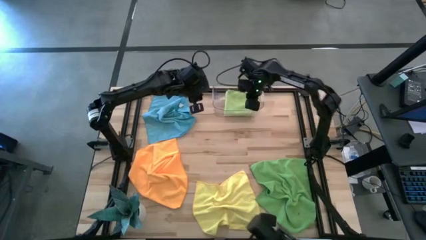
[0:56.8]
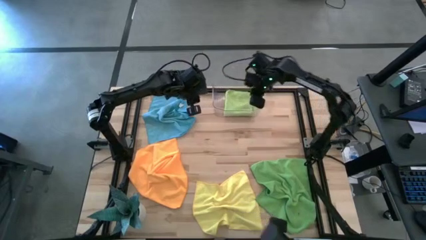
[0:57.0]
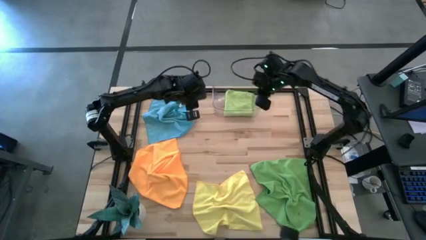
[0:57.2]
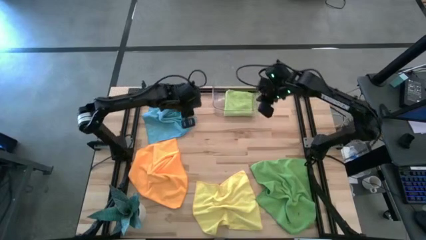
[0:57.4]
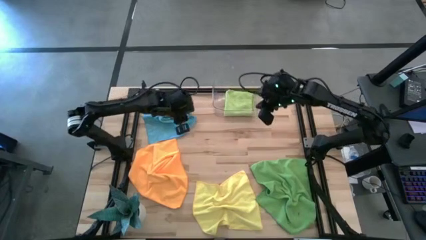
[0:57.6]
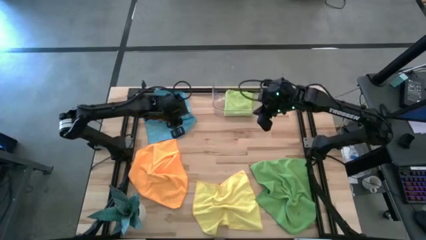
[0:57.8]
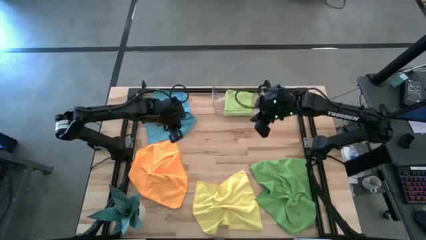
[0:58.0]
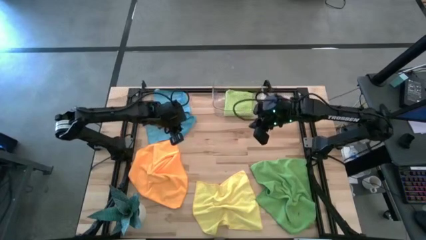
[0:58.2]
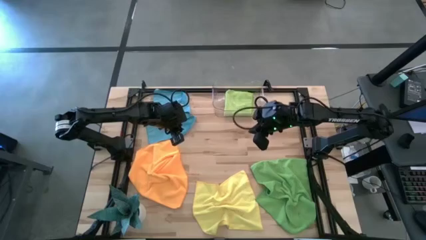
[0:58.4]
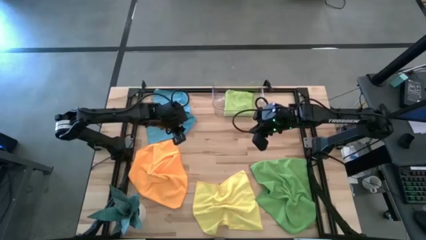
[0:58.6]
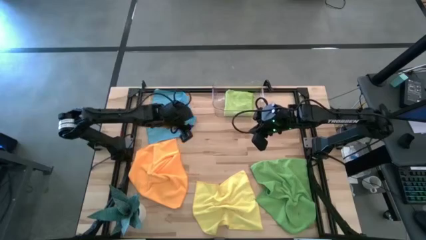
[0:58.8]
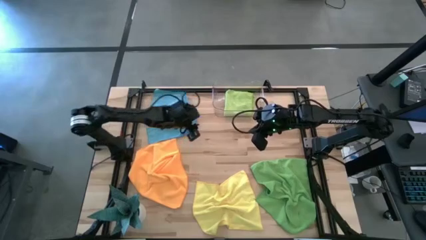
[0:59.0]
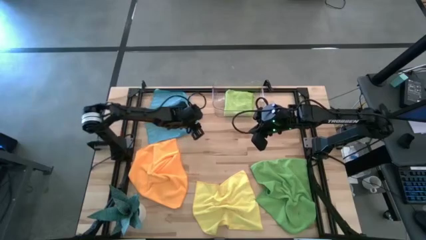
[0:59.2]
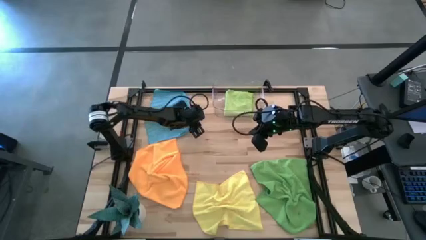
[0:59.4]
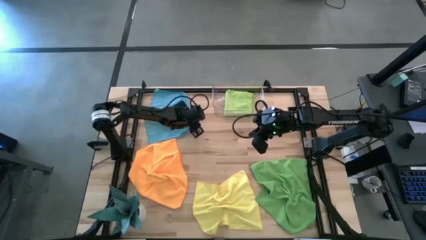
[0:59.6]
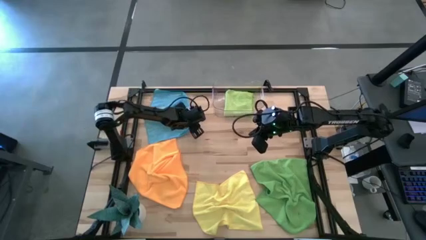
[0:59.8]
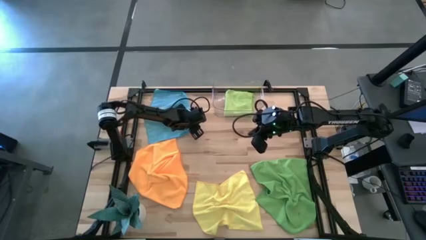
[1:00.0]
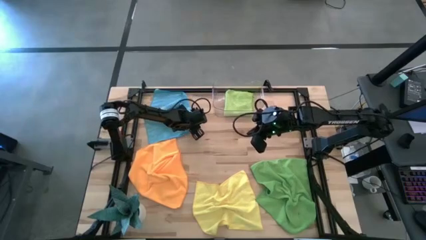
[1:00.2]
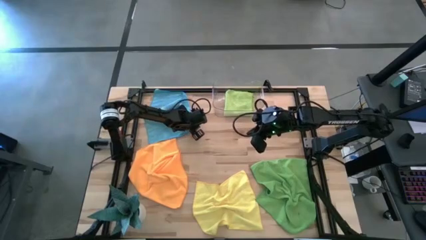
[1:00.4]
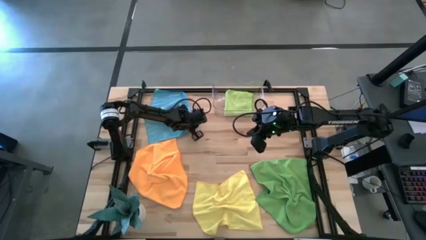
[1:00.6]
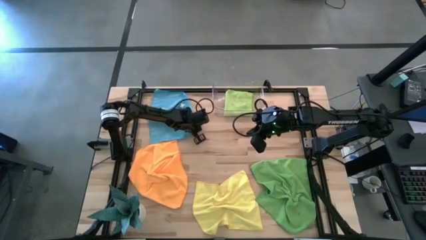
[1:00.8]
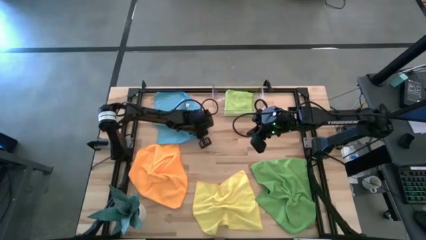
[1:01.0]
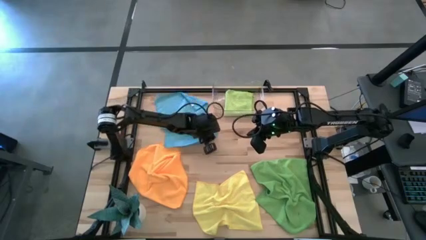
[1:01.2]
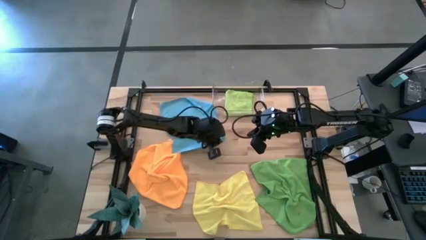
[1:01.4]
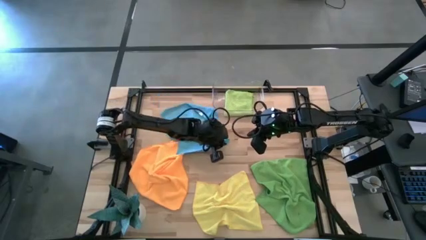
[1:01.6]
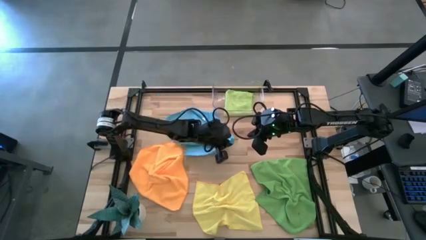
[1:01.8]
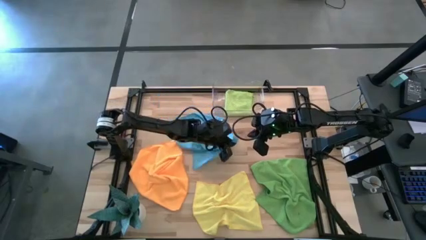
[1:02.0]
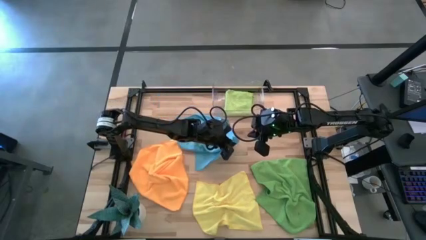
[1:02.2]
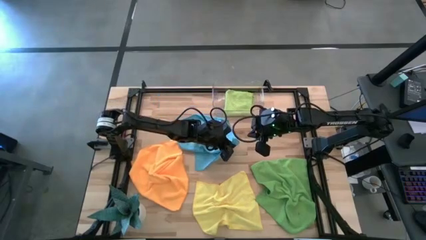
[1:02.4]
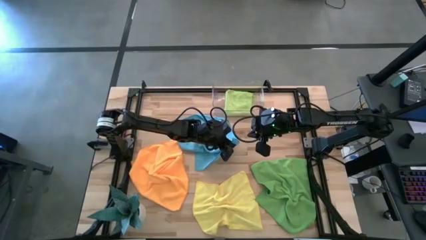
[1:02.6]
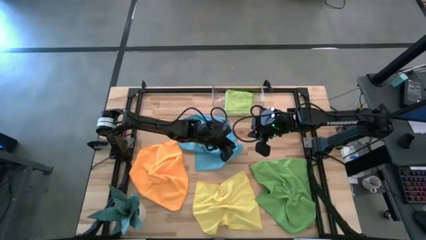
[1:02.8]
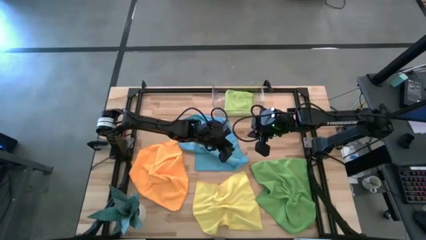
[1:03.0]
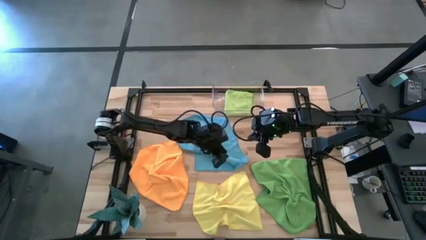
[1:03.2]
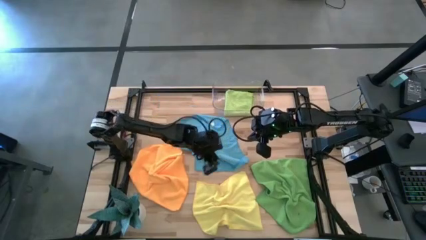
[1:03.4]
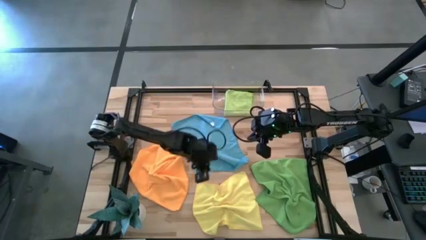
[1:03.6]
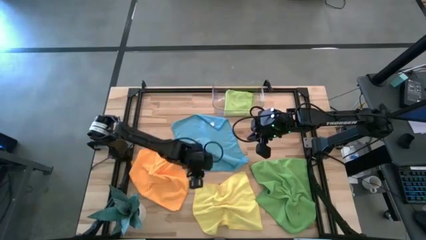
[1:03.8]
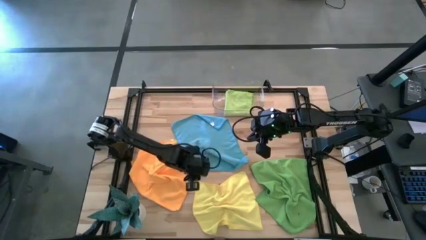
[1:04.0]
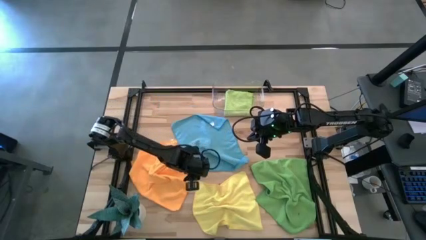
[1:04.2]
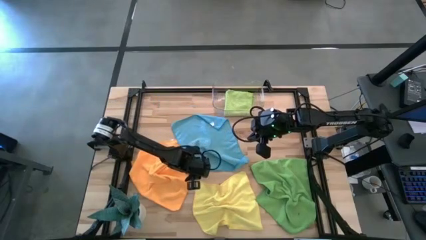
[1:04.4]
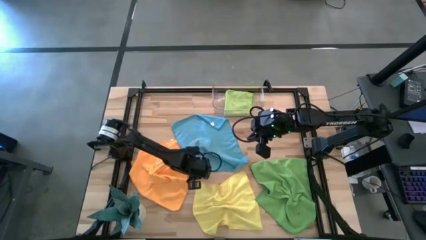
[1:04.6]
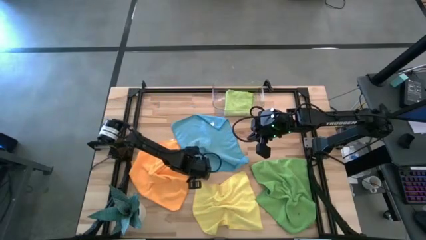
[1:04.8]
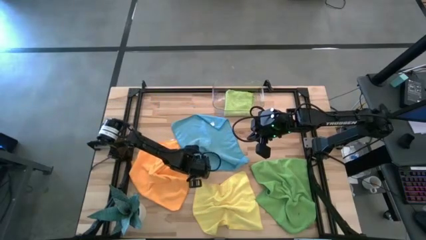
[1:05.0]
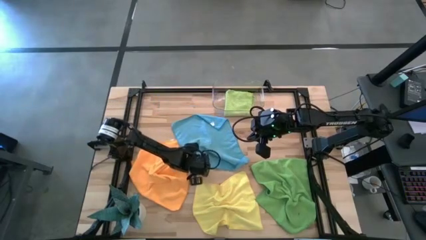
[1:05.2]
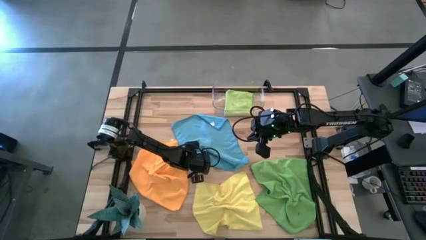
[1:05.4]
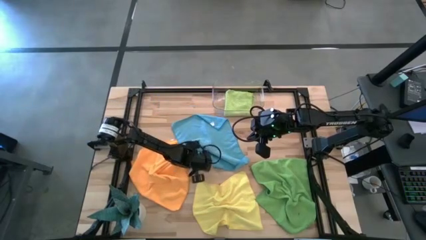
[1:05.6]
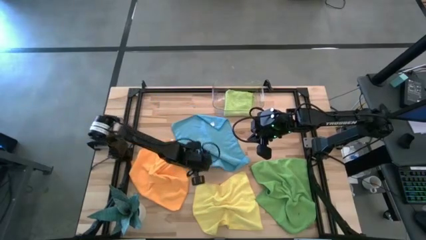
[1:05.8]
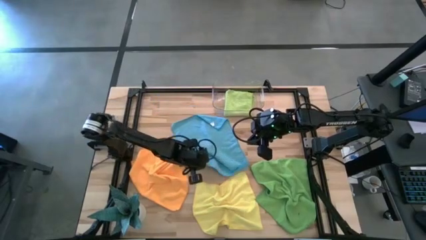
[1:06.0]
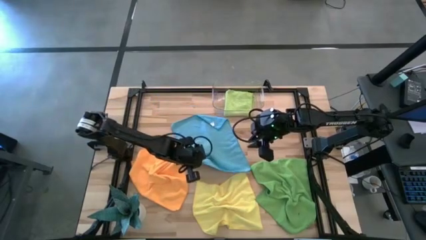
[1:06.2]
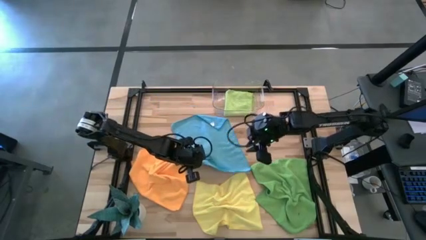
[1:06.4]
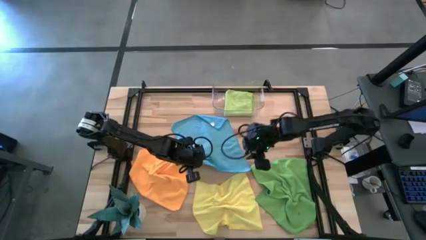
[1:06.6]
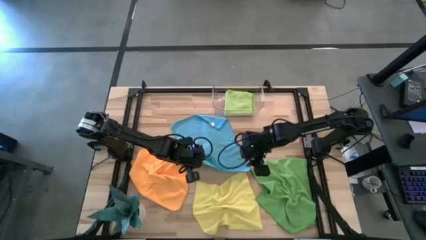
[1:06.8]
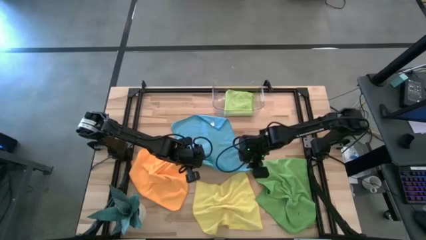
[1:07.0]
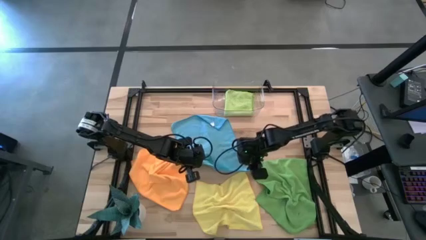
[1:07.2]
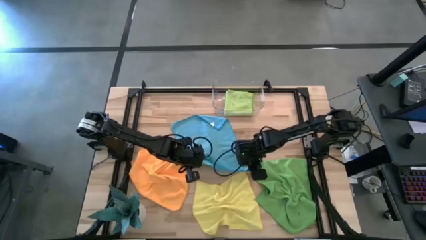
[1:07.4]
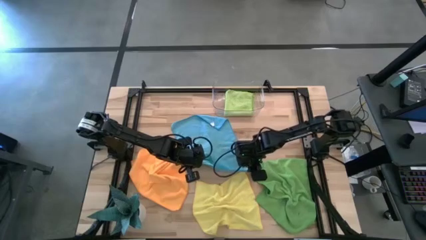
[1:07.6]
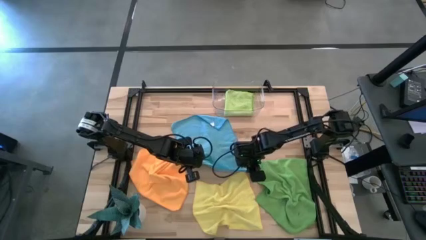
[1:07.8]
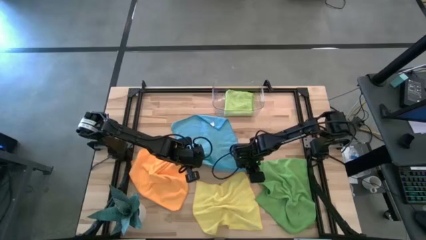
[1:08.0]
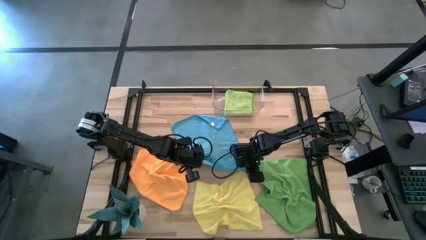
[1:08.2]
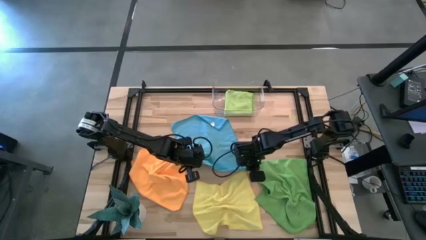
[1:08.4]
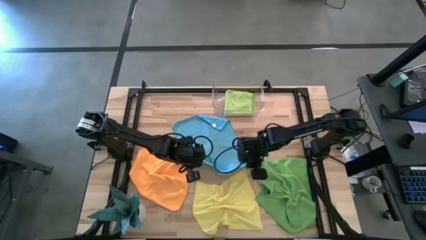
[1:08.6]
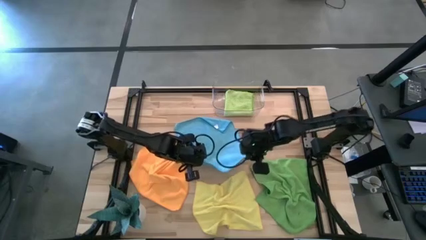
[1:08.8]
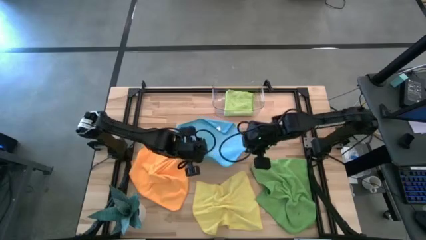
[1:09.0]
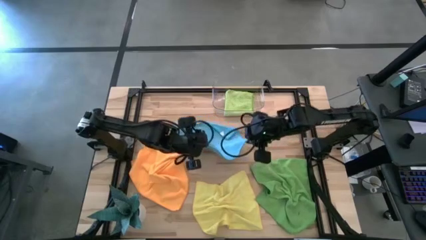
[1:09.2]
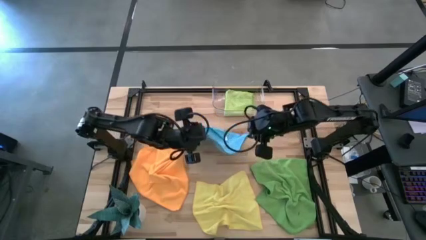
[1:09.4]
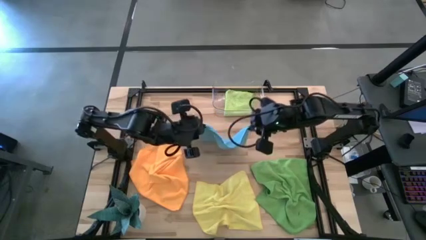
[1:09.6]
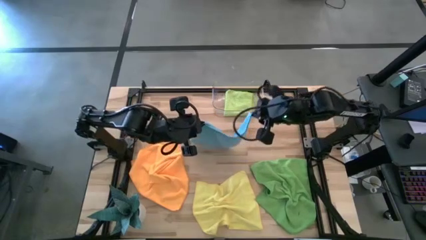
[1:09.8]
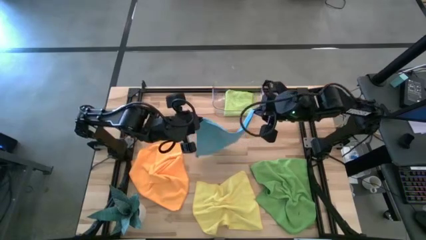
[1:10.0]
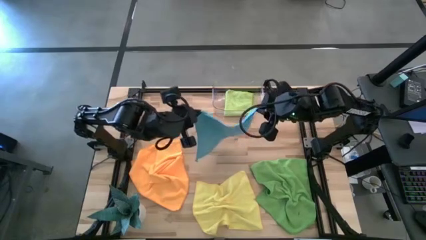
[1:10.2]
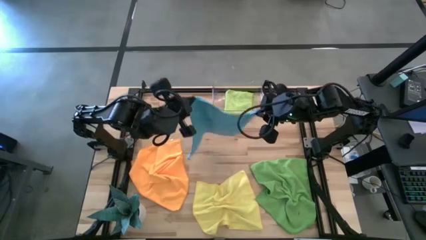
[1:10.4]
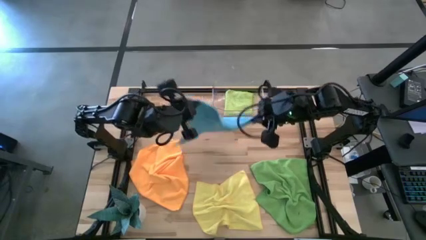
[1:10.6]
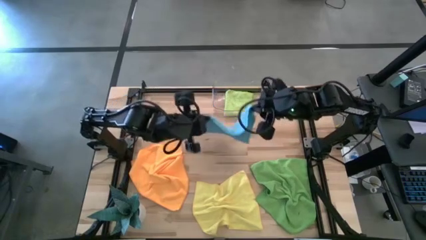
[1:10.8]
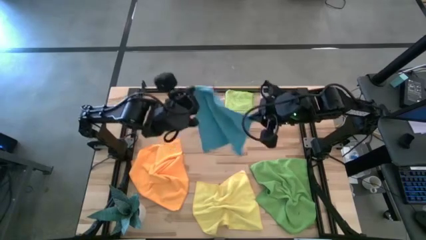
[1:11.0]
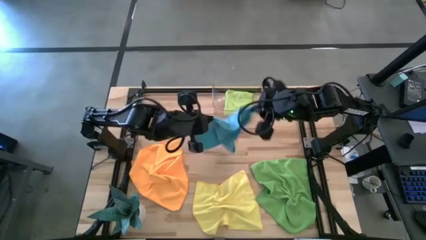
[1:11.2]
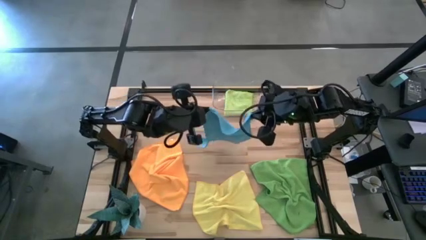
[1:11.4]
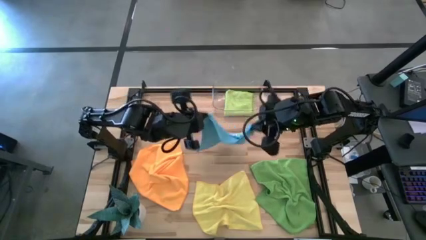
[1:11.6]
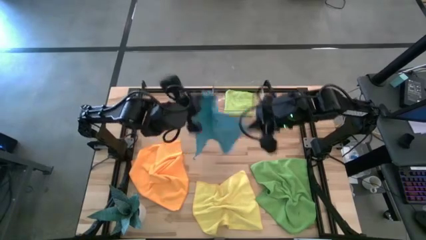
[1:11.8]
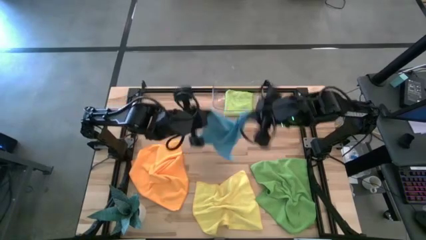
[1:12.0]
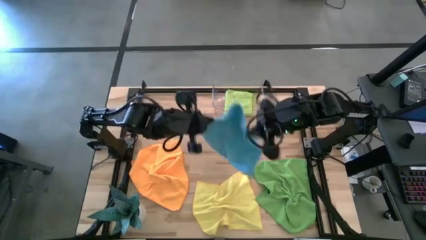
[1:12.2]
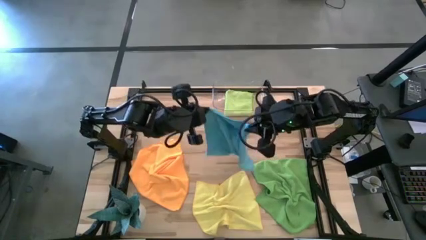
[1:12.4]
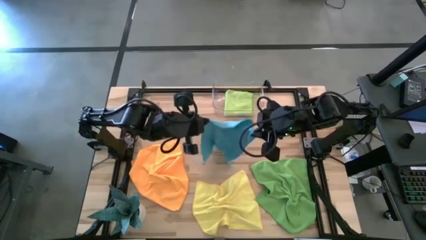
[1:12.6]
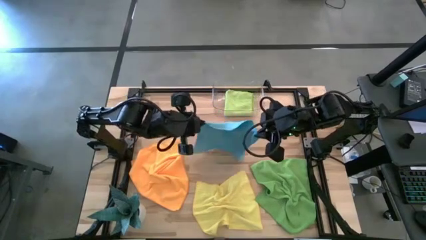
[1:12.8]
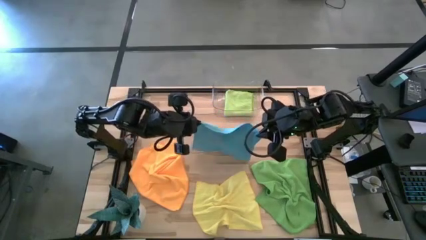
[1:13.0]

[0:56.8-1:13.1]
Task: Fold microfiber towels
Fold the blue microfiber cloth

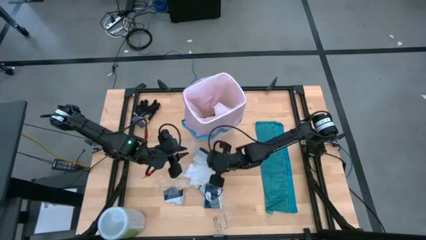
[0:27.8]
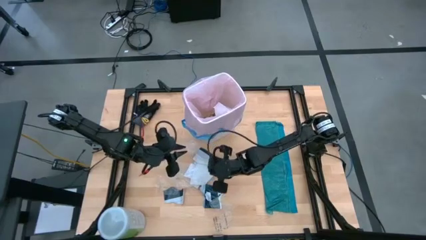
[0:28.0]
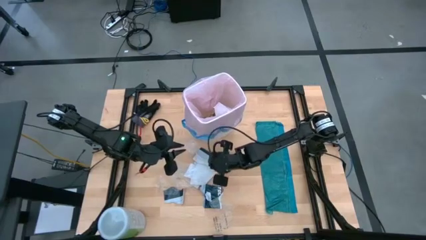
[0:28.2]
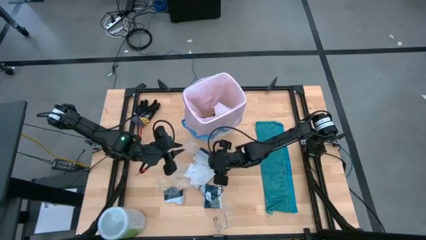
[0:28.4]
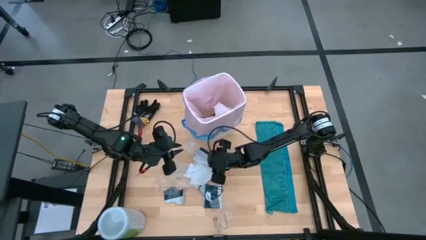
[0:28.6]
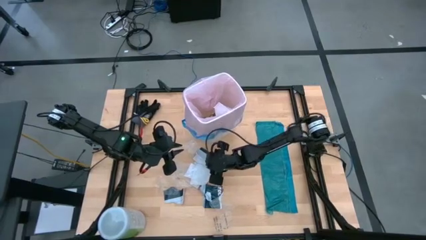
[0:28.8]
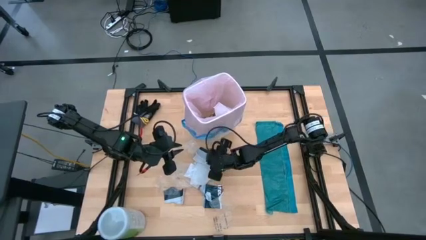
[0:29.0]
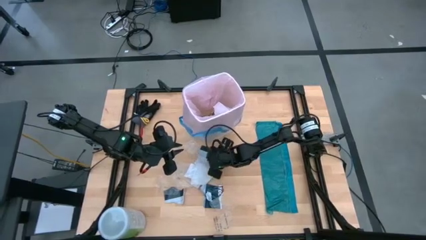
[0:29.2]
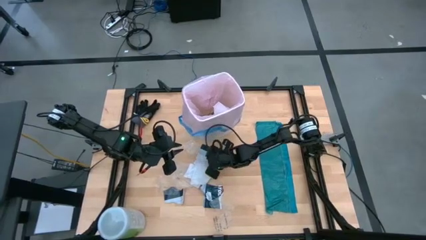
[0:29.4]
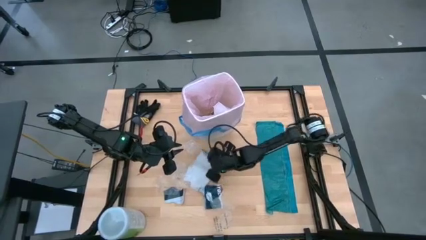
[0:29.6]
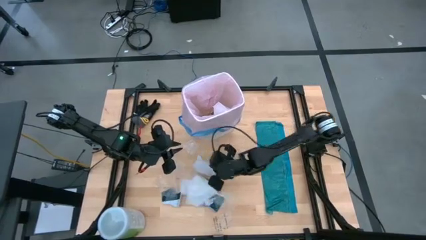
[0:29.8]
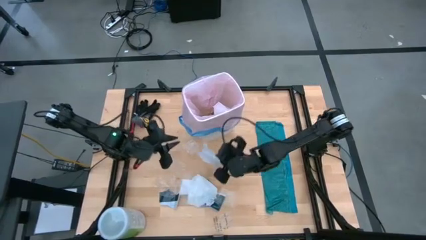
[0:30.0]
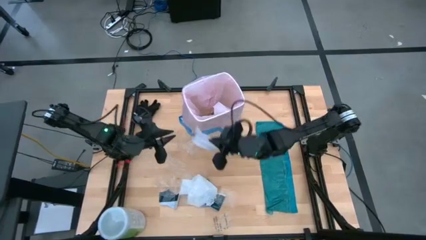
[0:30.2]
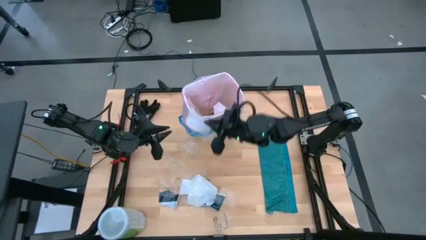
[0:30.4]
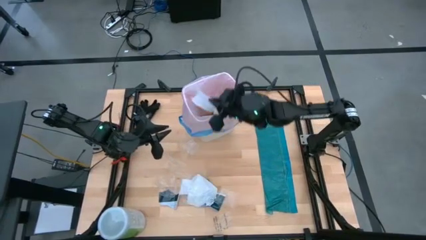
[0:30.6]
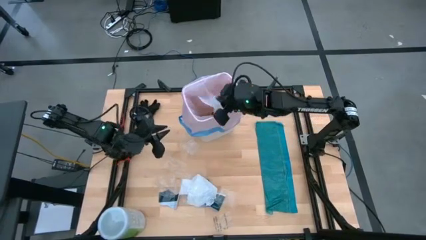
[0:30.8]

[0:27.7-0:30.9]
Task: place trash/remove bag and relplace
Put the black-white paper trash into the white trash bin
